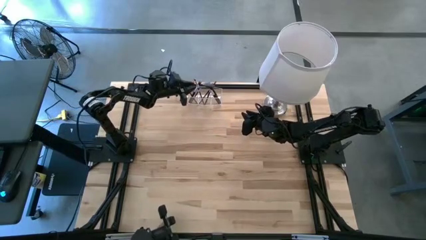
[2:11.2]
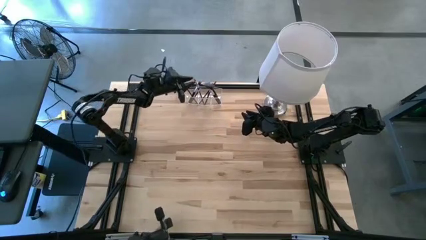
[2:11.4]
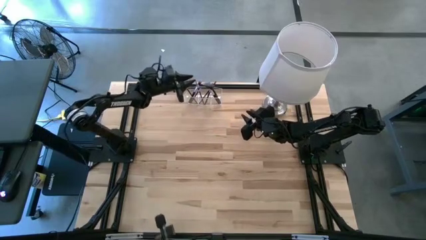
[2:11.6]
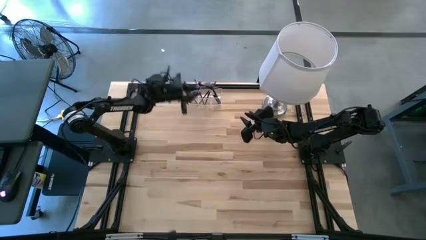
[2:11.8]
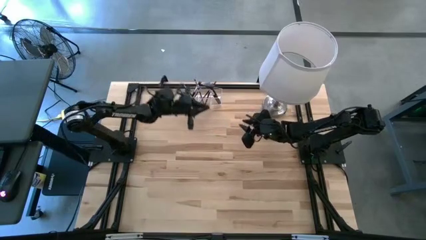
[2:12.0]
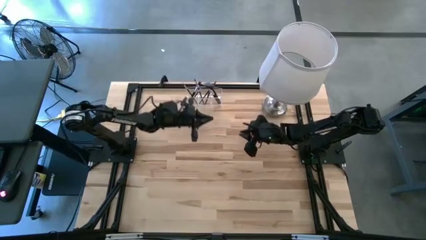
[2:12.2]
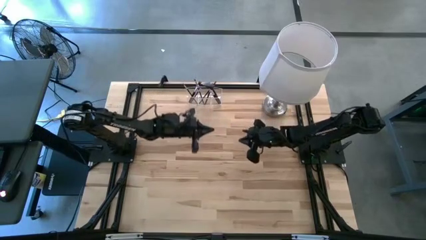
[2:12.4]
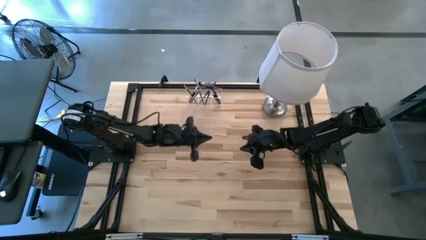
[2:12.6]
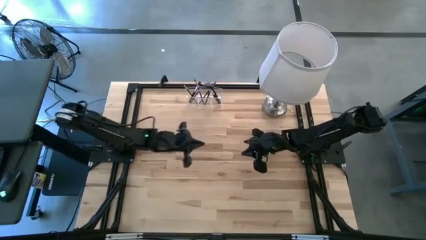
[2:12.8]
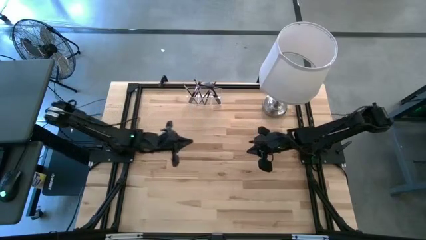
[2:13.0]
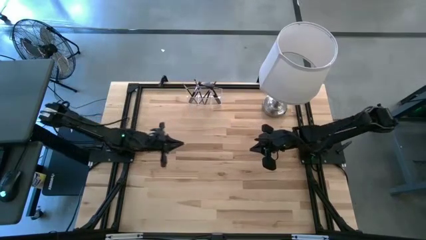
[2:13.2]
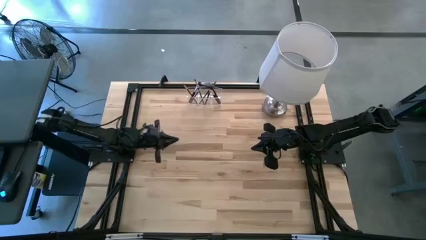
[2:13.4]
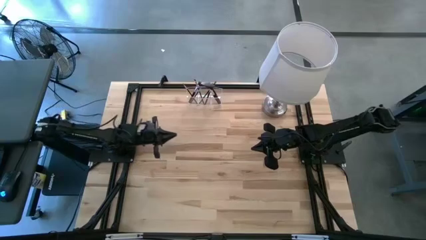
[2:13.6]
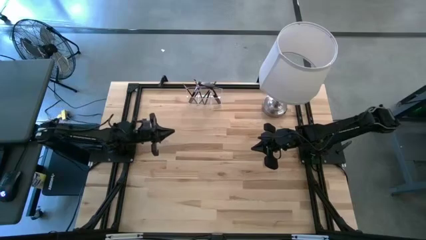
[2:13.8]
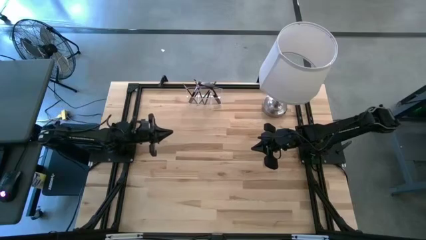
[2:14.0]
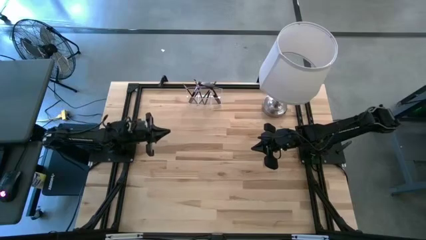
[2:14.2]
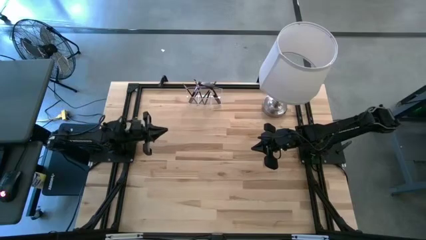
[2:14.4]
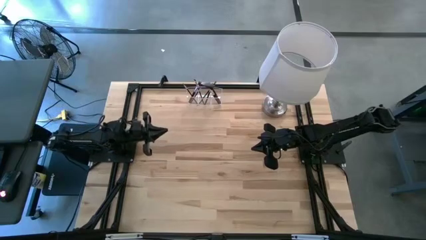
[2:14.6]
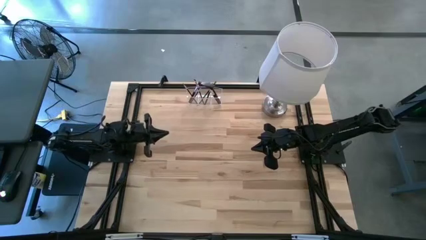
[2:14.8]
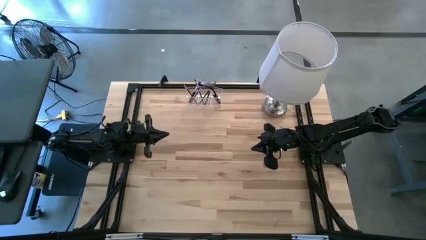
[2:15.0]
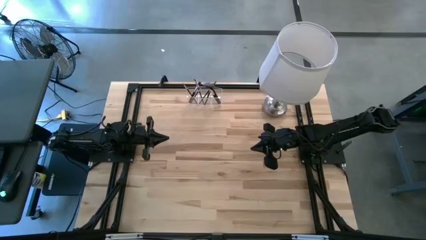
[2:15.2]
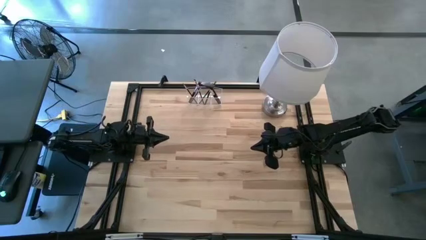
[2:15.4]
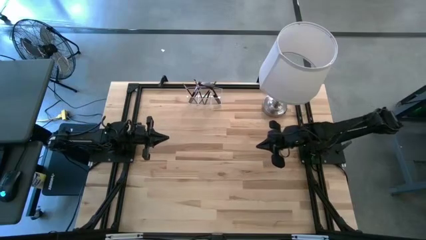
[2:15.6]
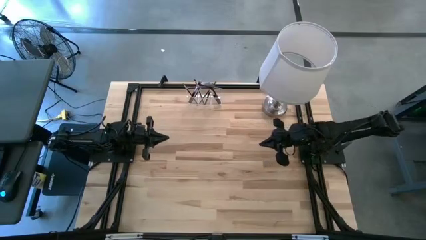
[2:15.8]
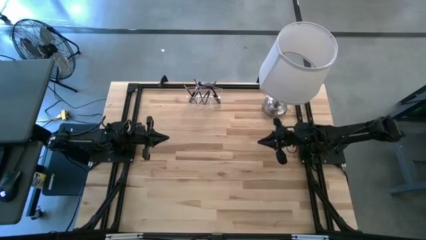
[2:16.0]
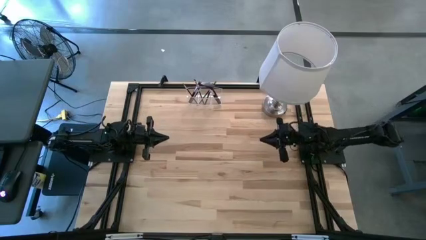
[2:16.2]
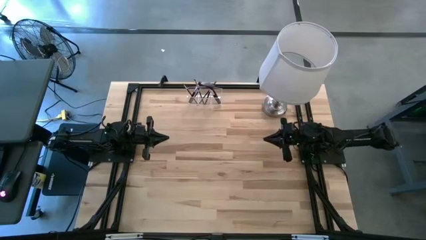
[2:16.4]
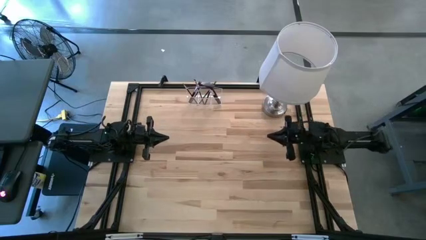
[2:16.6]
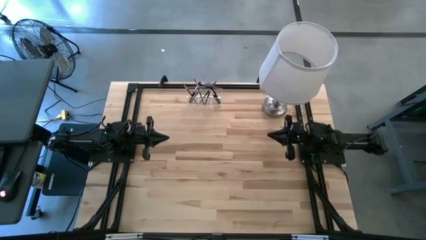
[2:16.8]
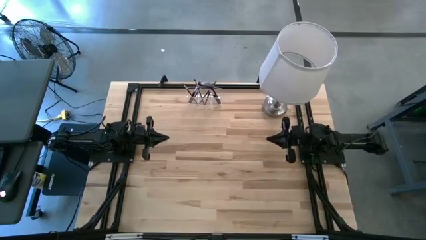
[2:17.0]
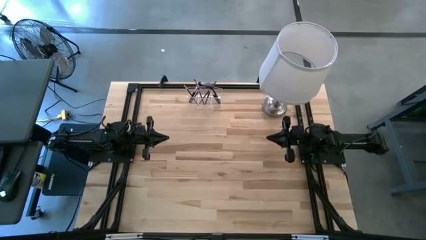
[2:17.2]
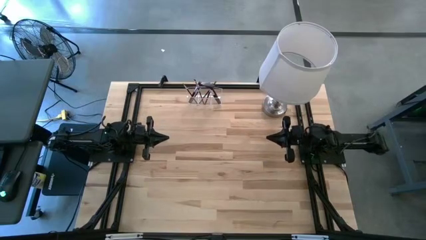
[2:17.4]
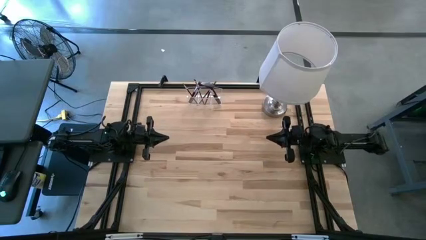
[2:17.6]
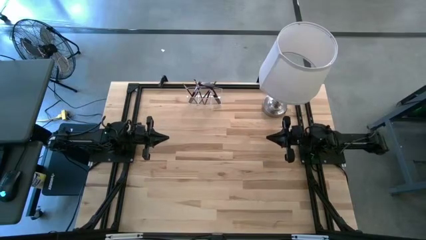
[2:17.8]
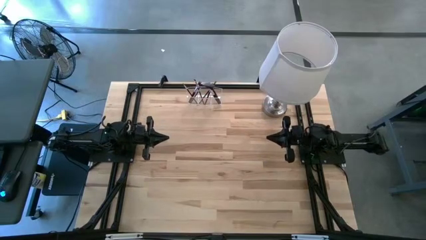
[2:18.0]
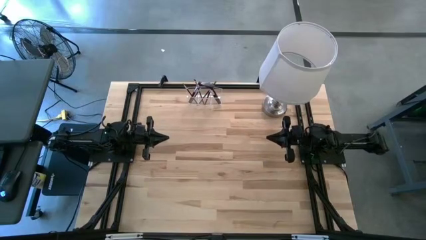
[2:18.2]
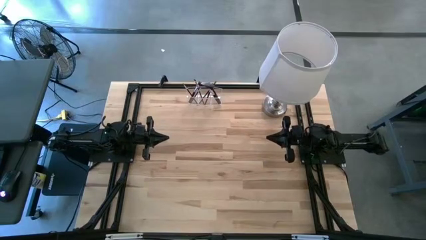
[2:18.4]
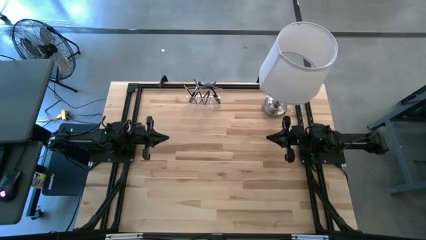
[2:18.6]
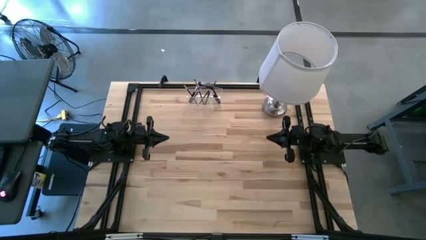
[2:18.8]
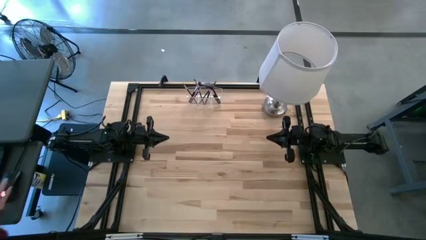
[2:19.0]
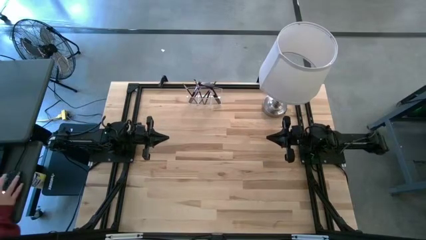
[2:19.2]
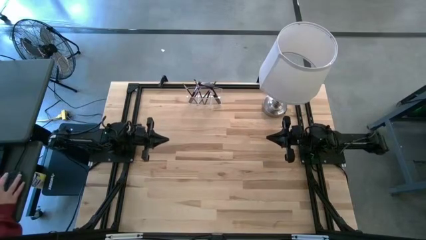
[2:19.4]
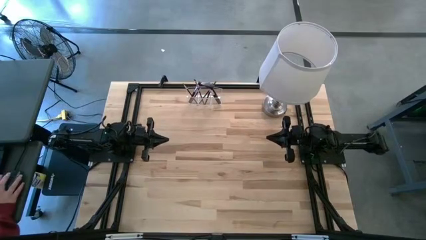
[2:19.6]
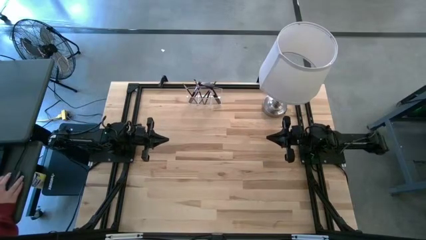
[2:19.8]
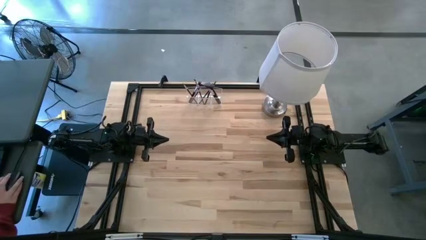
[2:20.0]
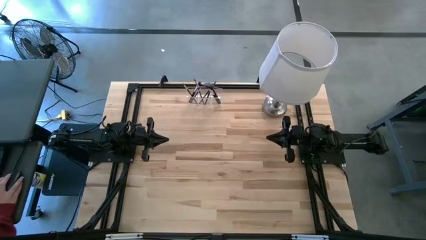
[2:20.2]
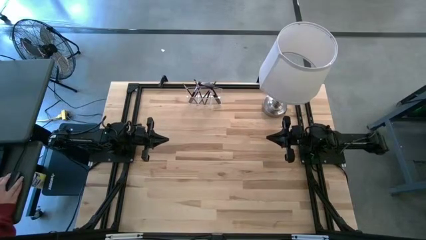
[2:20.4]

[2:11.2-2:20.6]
Task: Put items in baskets/containers
Return to Home Position

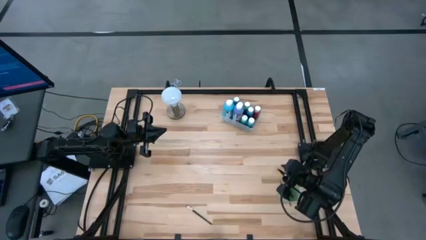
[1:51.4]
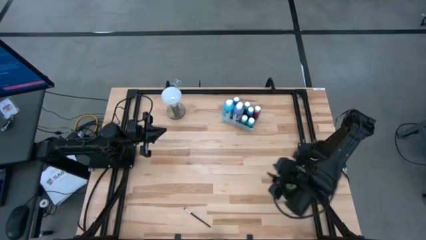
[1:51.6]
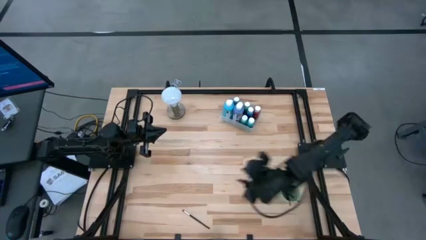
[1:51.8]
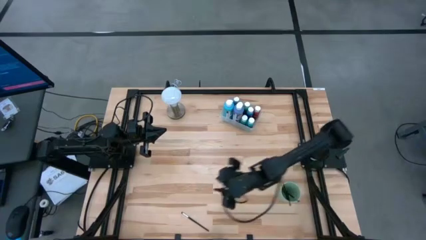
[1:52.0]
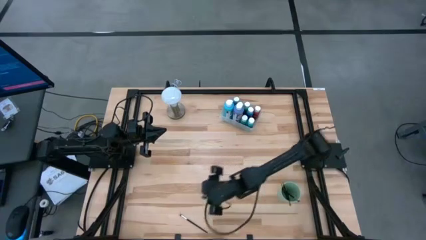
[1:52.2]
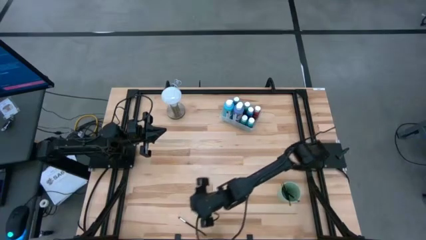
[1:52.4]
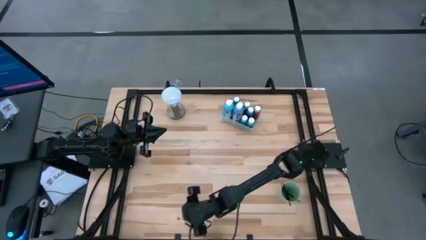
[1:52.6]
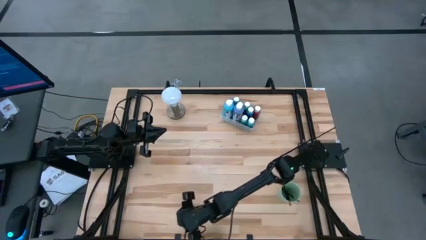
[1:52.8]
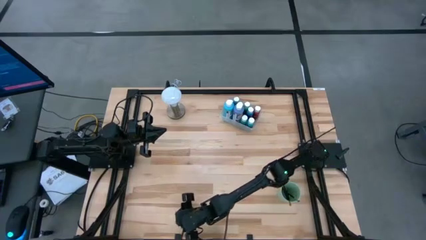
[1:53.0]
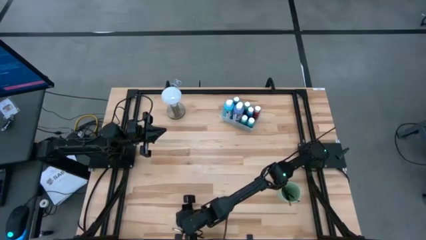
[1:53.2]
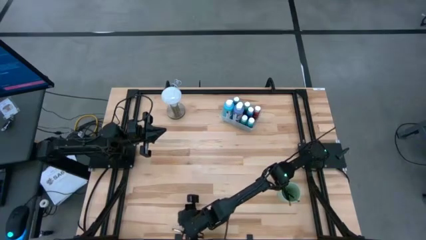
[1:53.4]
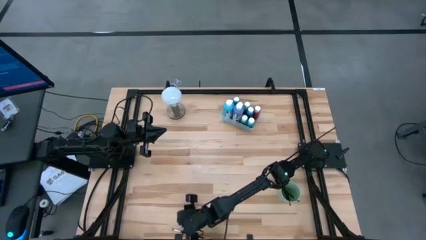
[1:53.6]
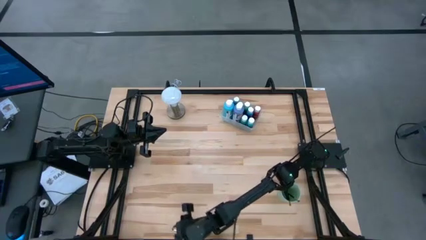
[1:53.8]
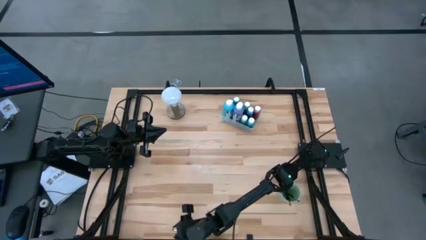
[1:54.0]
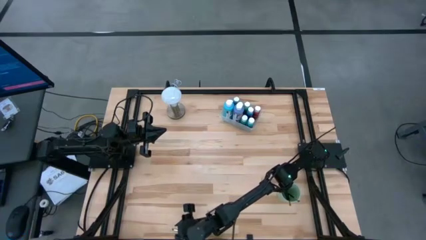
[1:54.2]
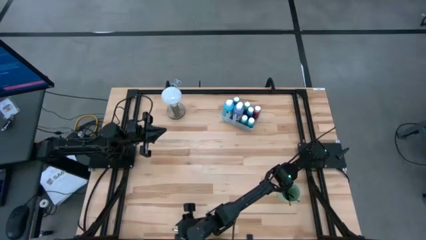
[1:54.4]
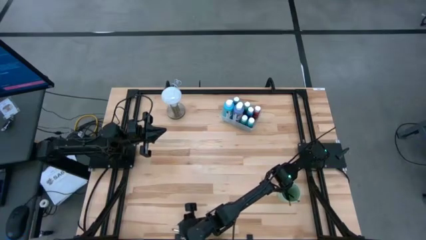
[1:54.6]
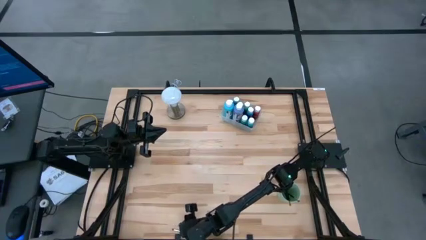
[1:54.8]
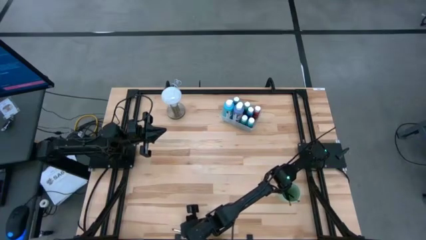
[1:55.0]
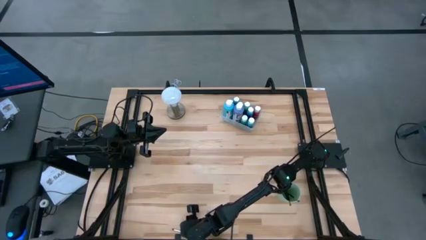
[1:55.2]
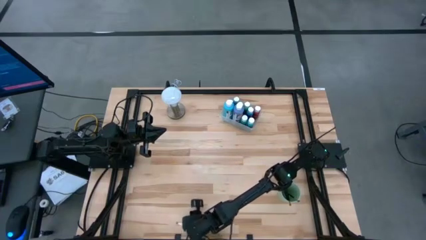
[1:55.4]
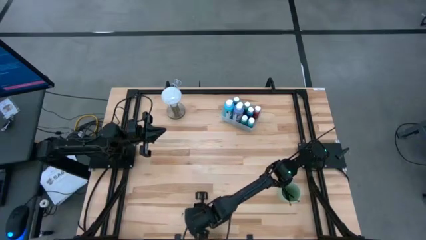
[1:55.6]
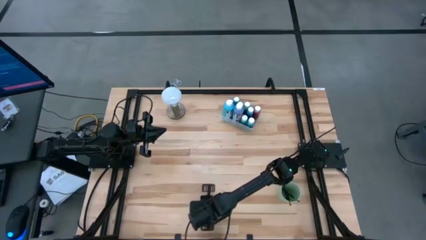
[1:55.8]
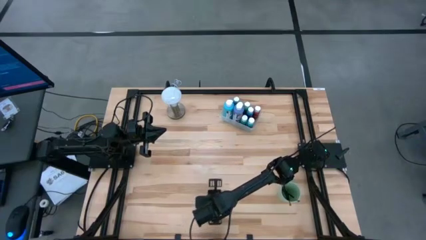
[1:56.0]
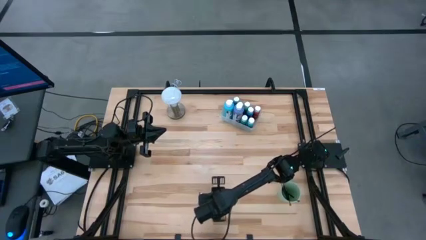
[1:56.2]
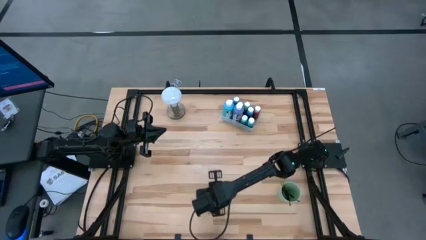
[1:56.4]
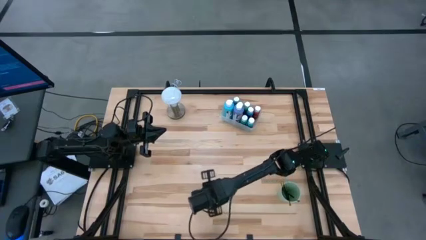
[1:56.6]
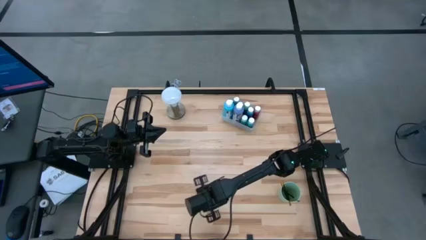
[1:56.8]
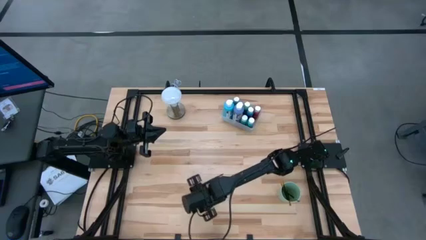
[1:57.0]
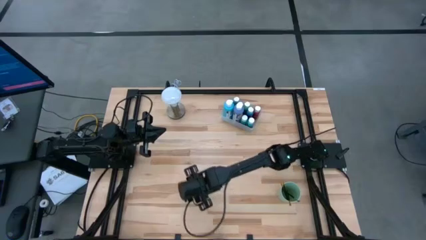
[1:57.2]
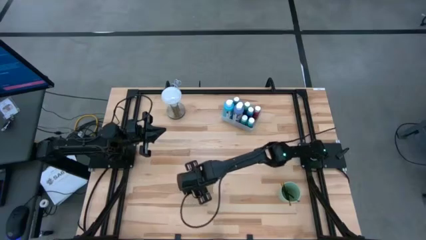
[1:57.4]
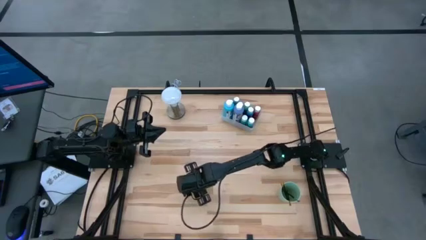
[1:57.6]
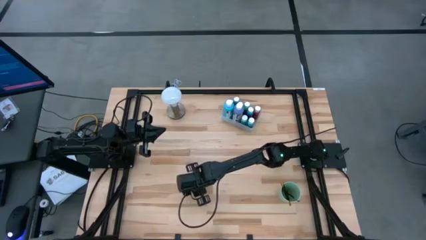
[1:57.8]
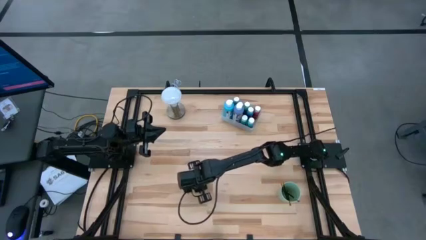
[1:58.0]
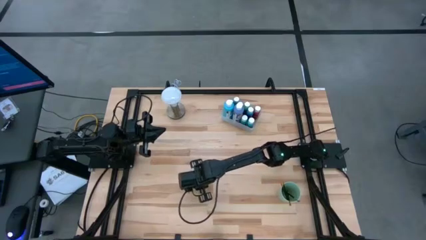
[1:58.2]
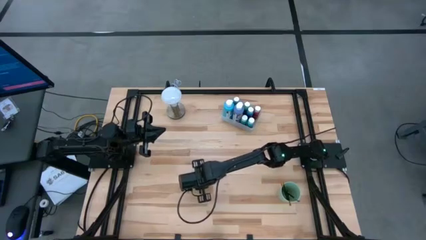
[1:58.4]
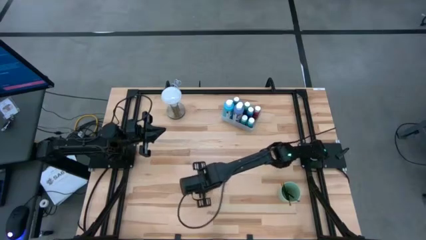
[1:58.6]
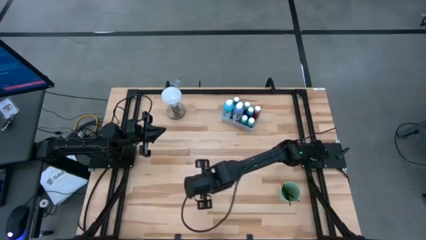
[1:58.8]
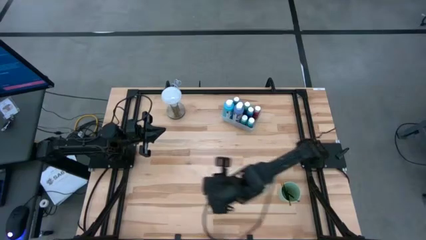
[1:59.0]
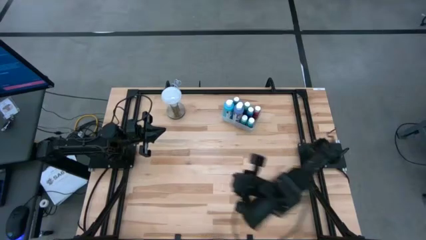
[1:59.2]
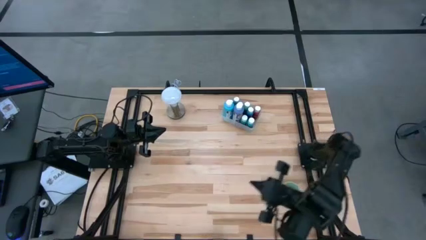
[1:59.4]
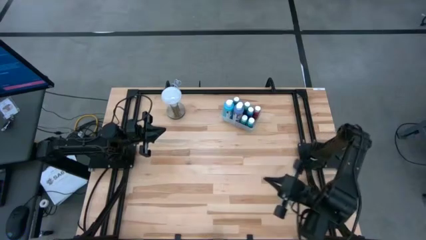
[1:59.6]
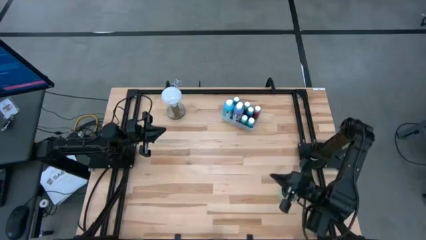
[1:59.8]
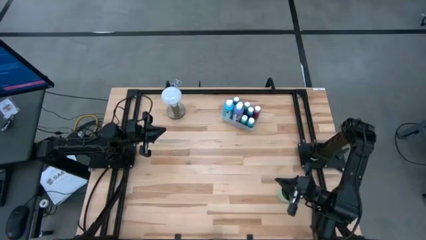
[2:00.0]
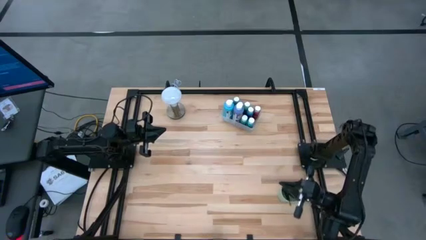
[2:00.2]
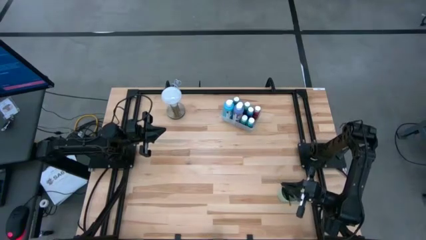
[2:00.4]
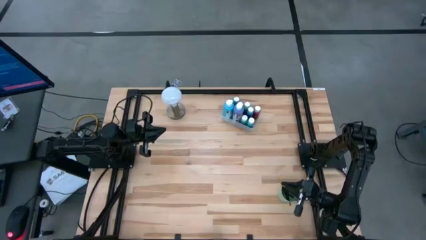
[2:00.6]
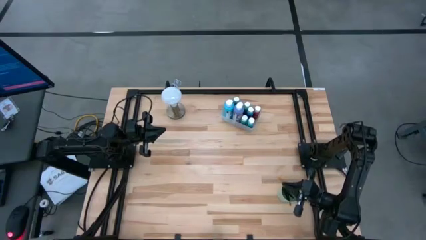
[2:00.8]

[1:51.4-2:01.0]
Task: Pick & Place Paint Supplies
Put the eyeshadow brush into the green cup
